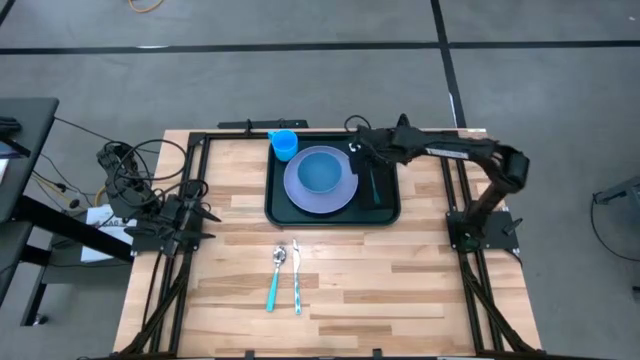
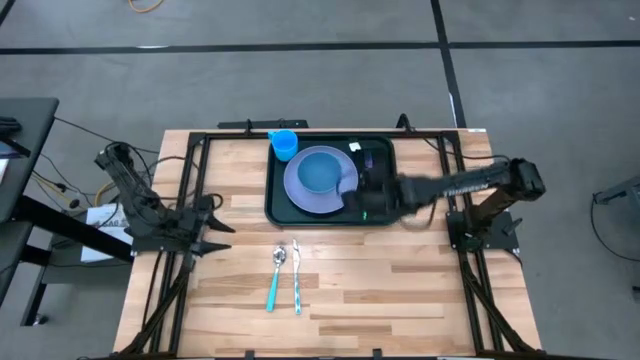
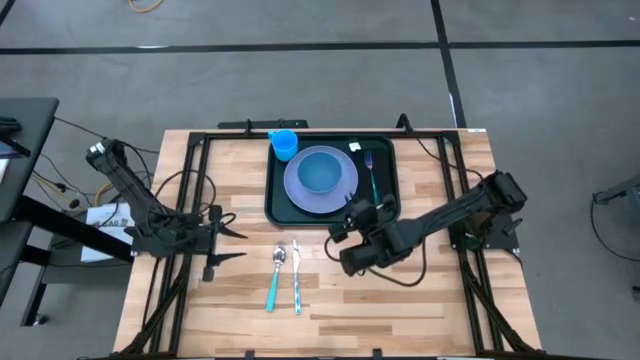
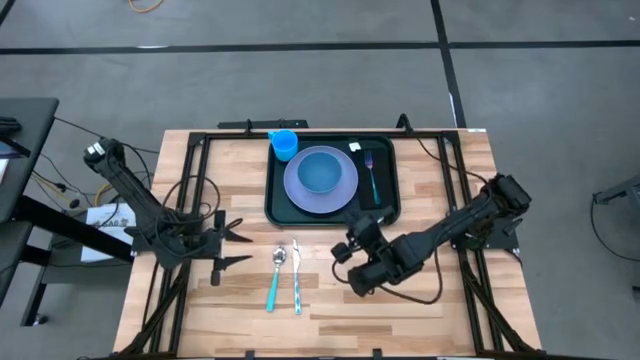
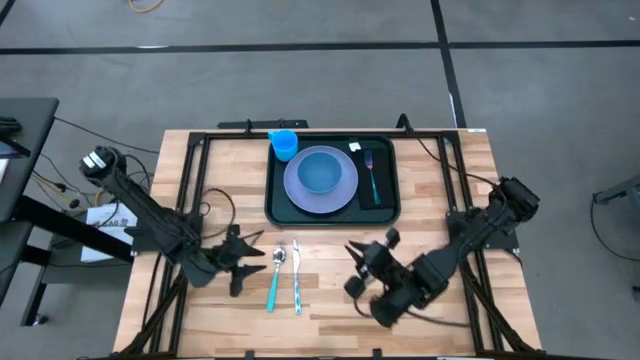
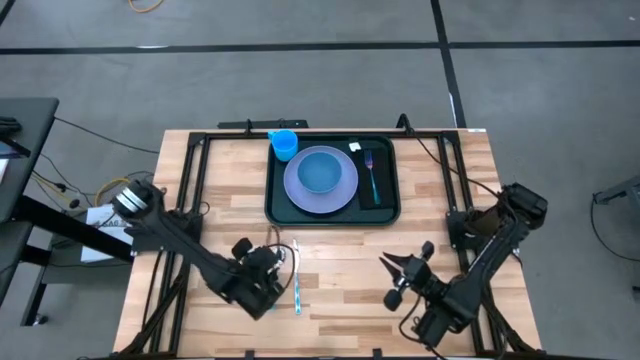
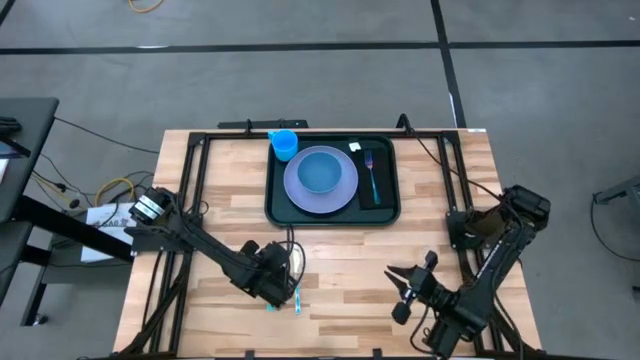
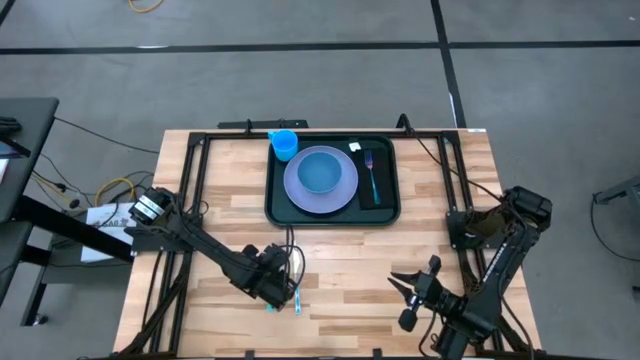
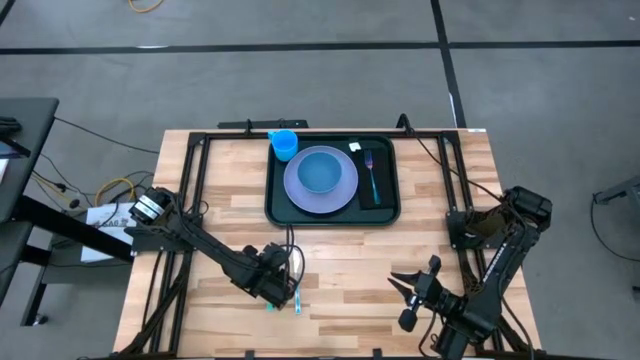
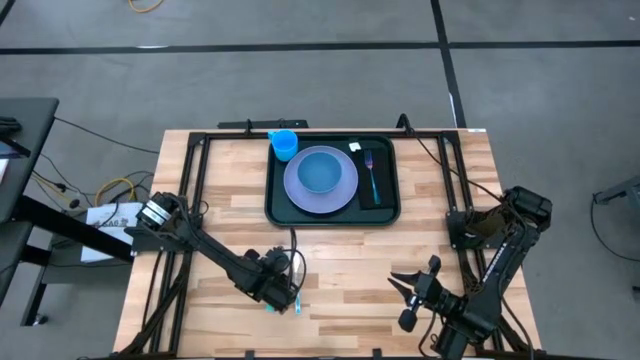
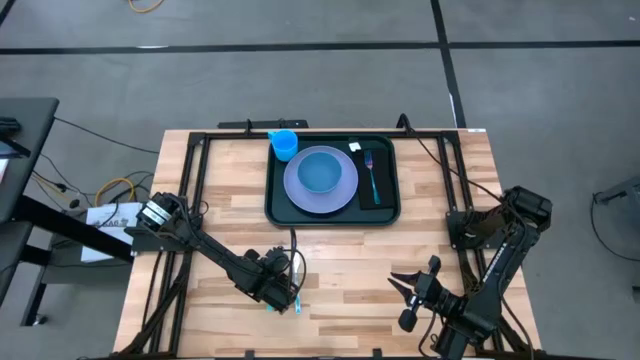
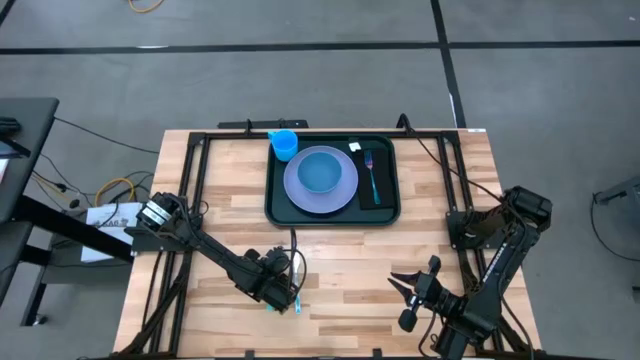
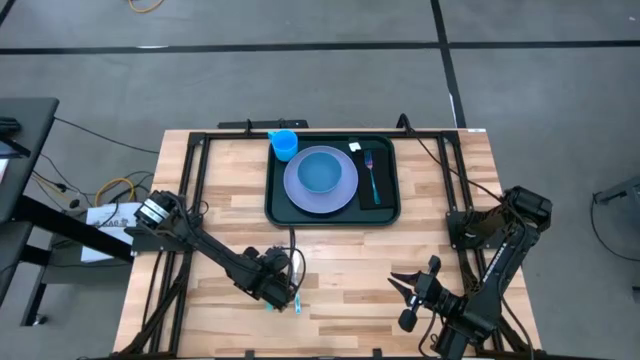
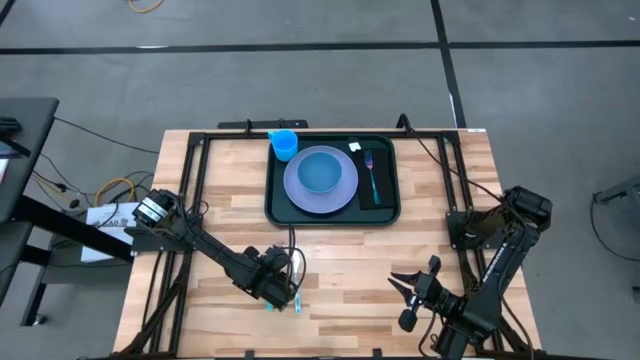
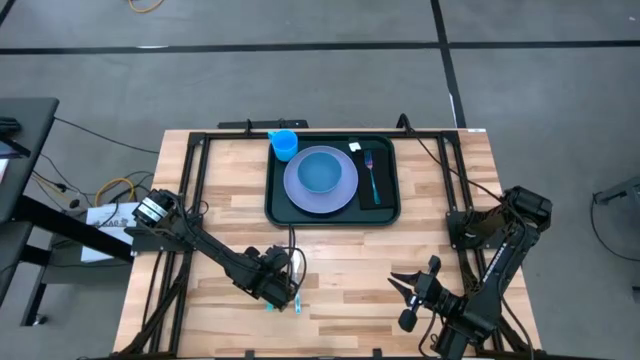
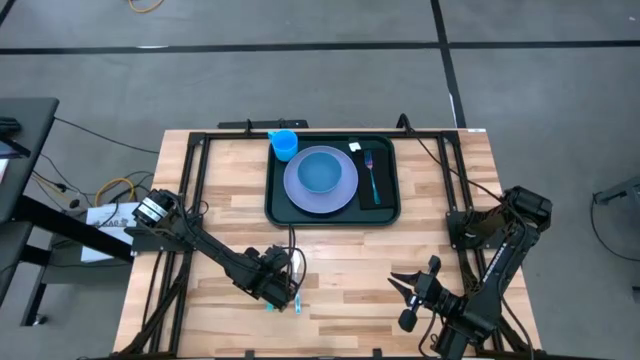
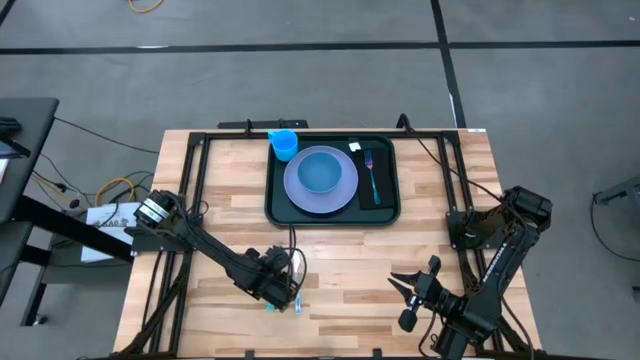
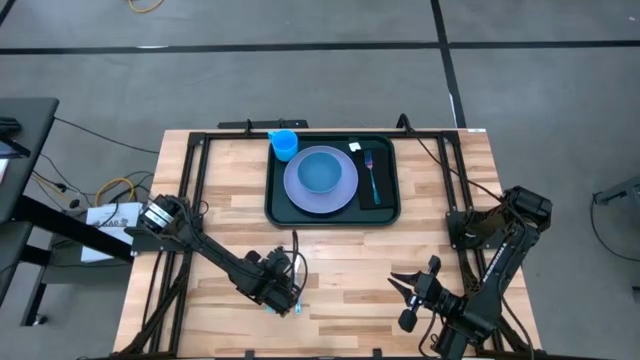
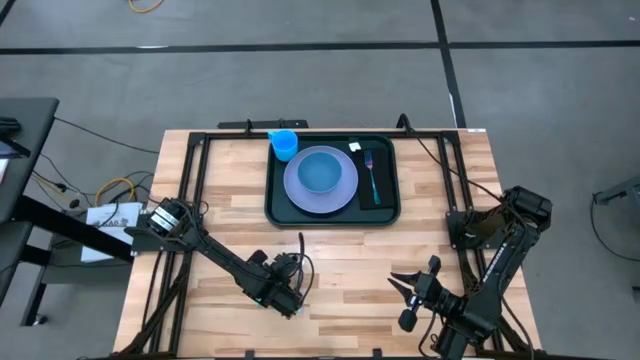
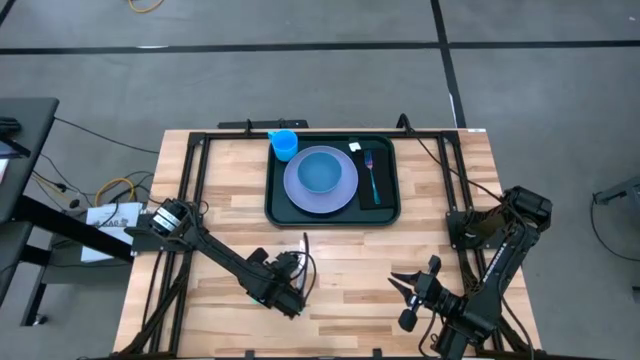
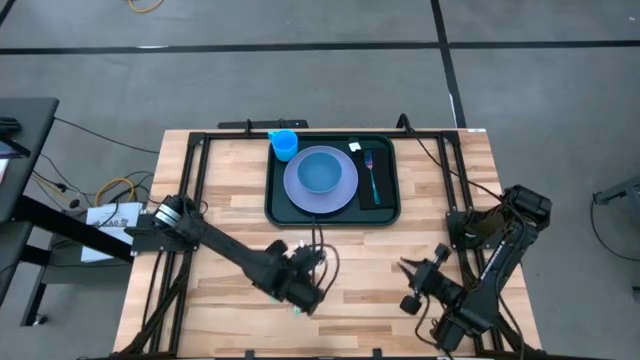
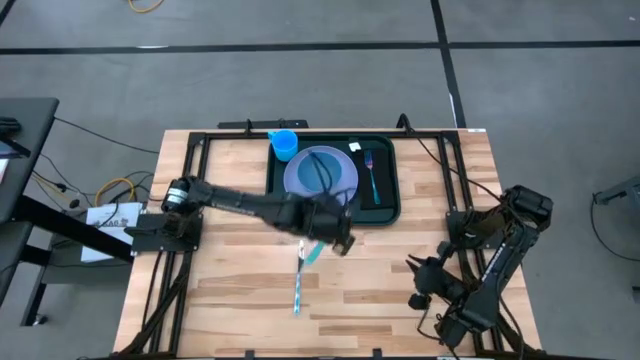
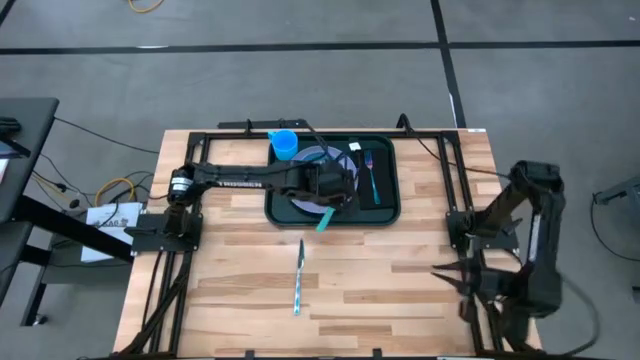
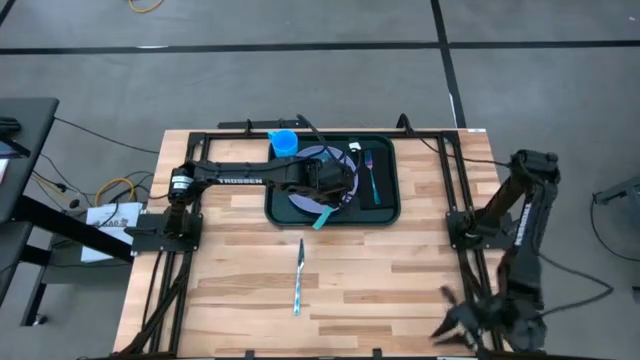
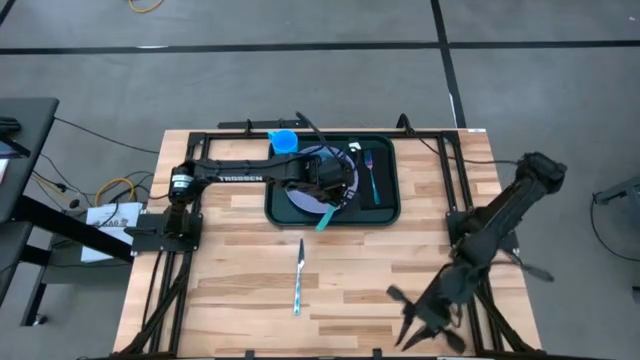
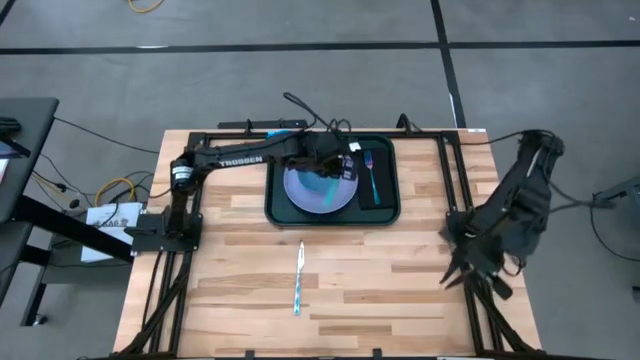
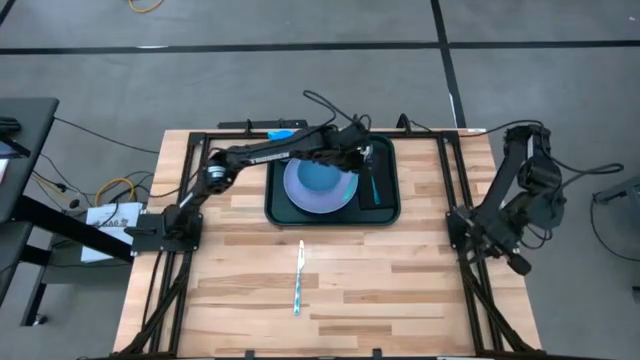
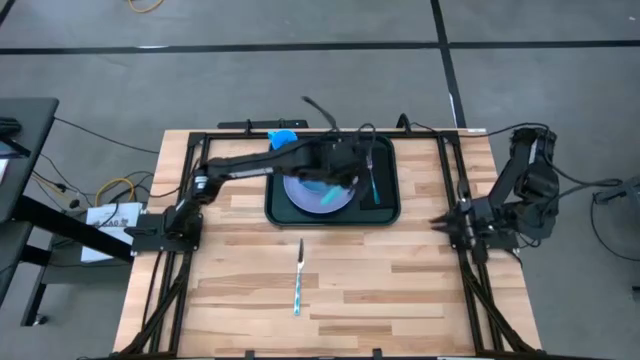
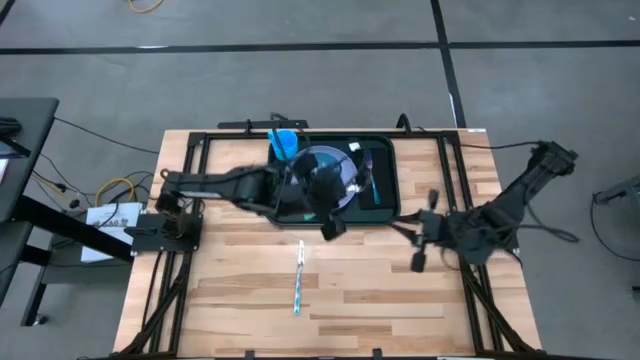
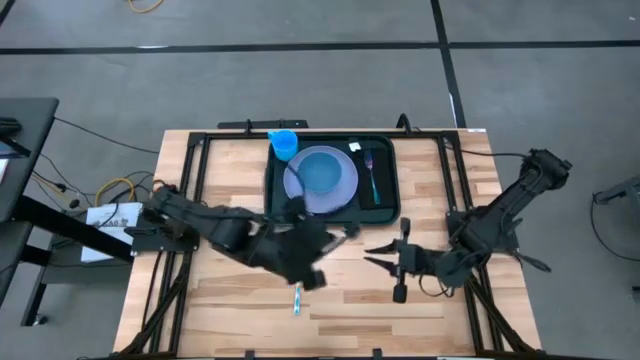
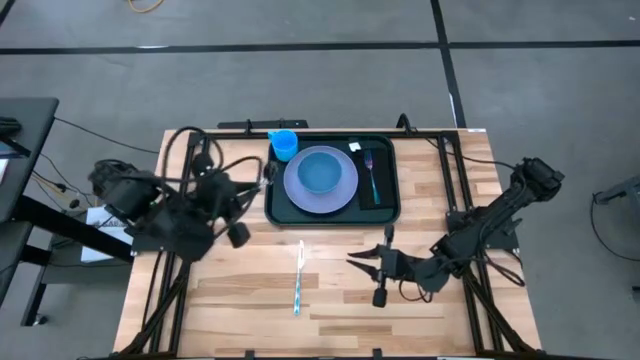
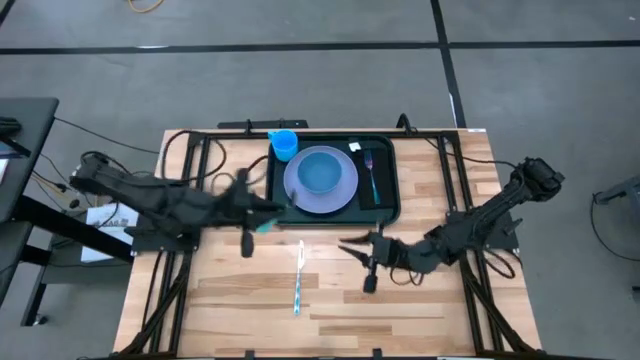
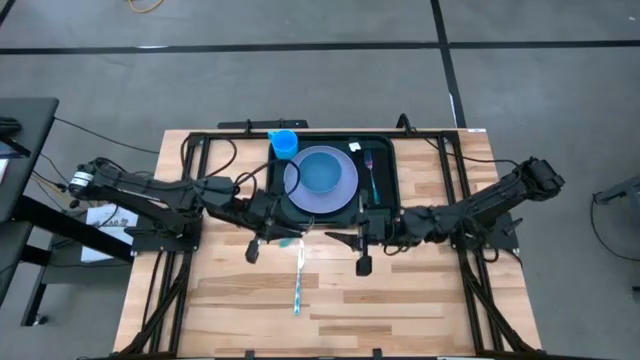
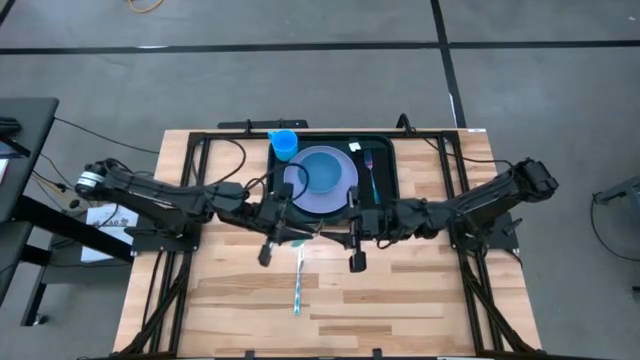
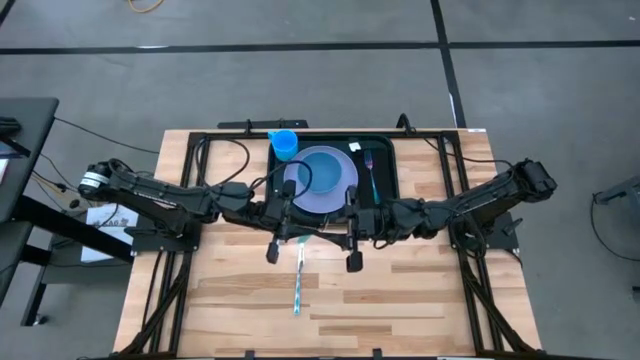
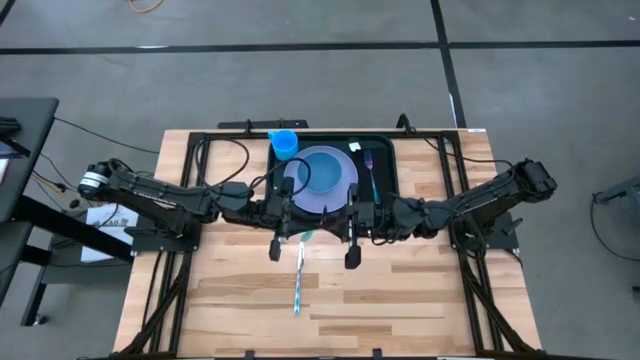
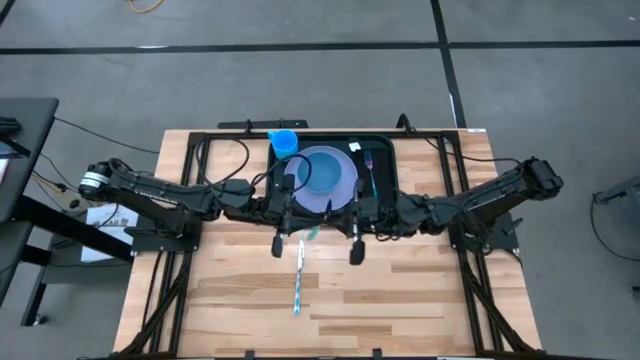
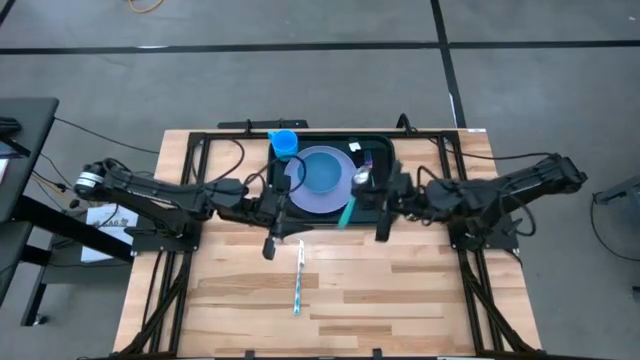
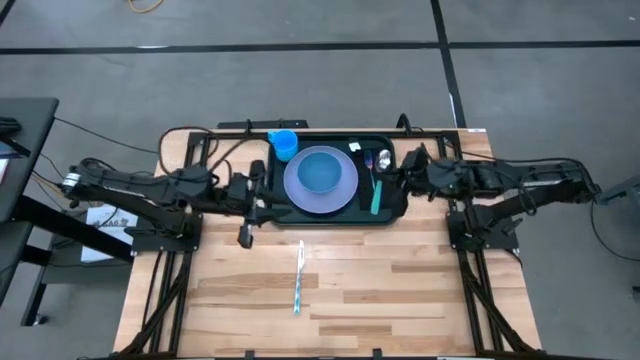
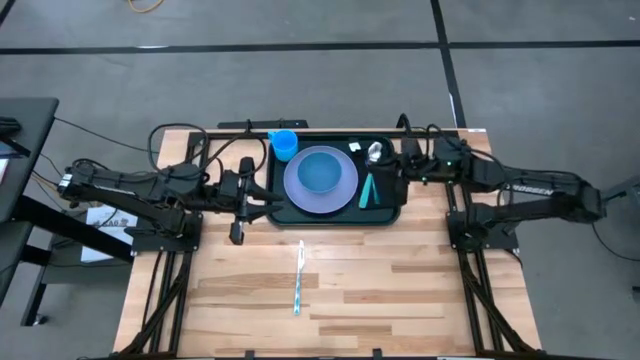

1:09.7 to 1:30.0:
Task: Set up tray
Put the spoon on top of the table napkin to the left of the table fork on the tray

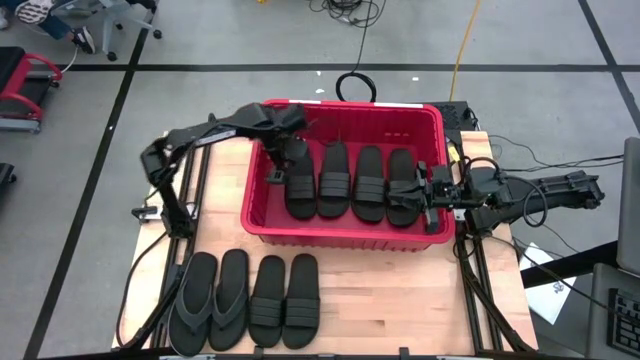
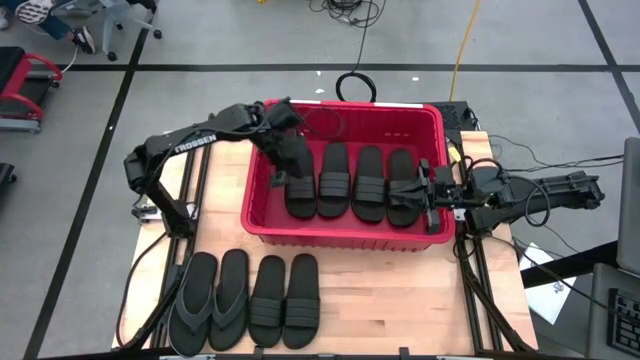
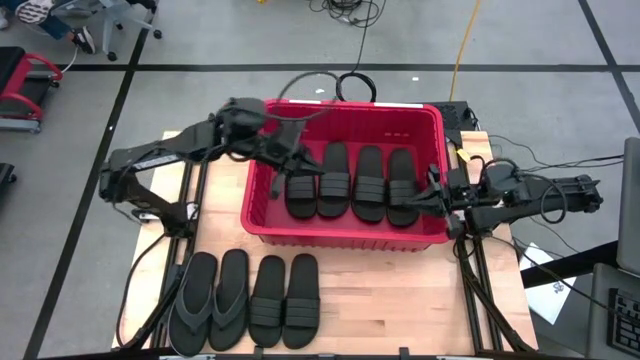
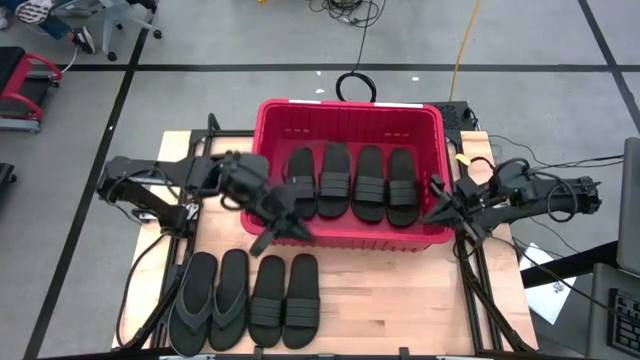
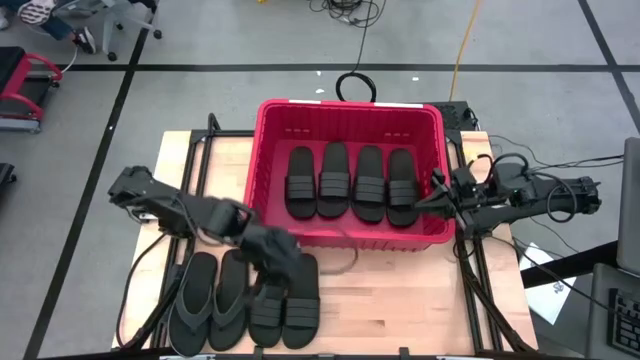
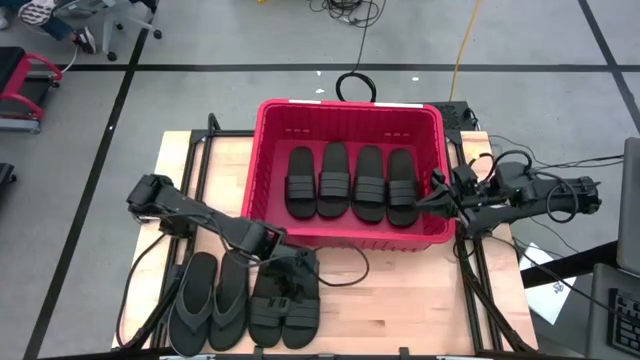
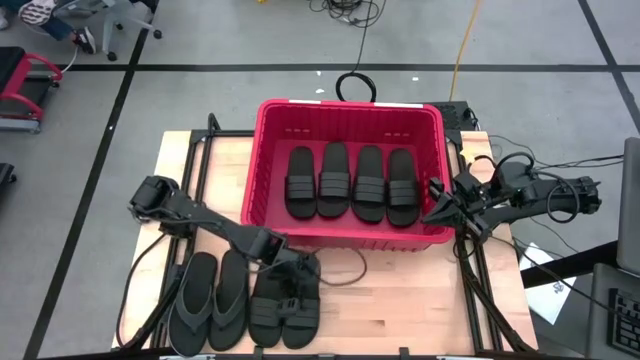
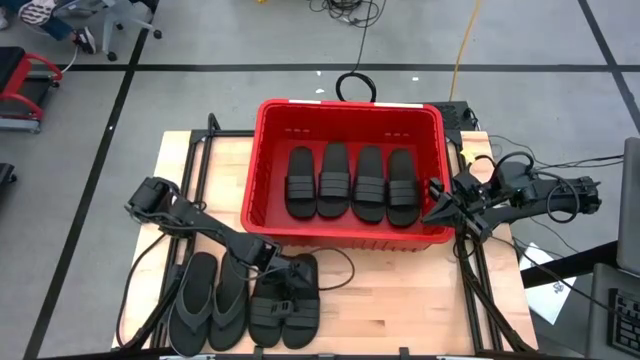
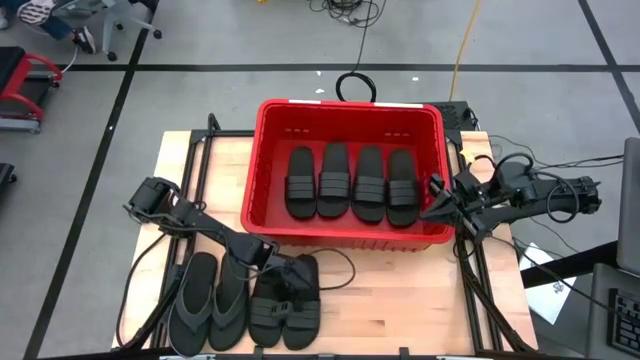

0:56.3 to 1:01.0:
Task: Pick and place slides into bin
Put the black slide into the red bin
